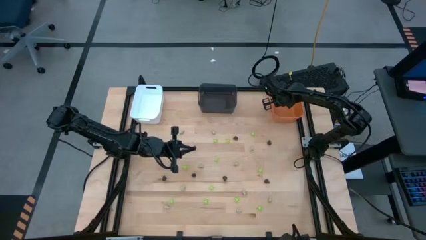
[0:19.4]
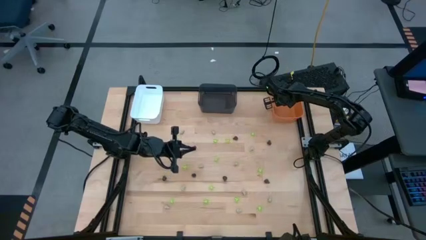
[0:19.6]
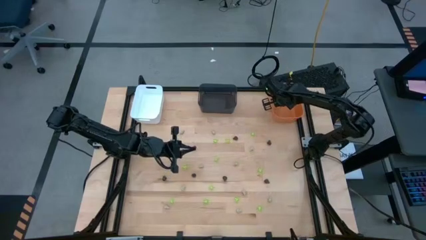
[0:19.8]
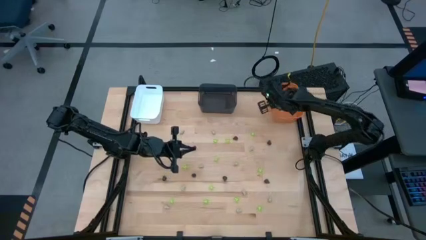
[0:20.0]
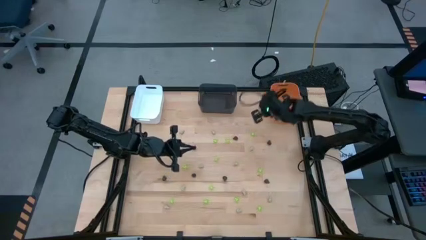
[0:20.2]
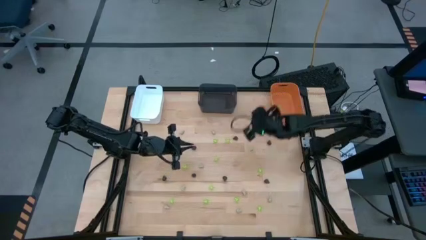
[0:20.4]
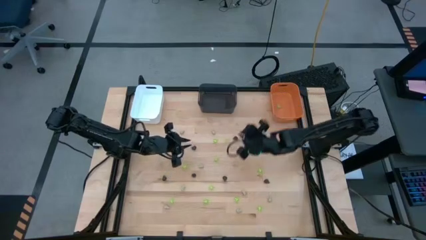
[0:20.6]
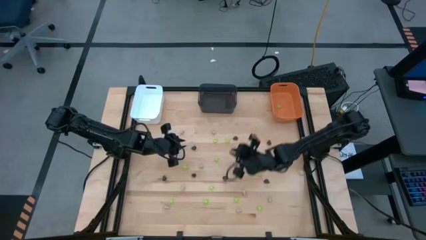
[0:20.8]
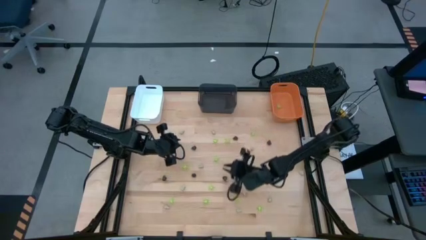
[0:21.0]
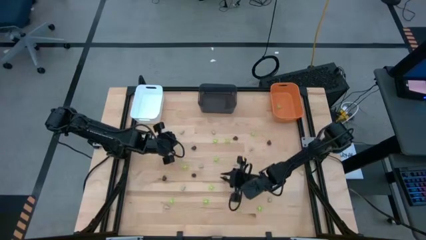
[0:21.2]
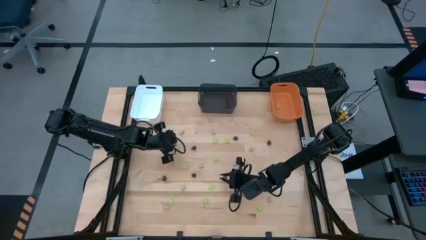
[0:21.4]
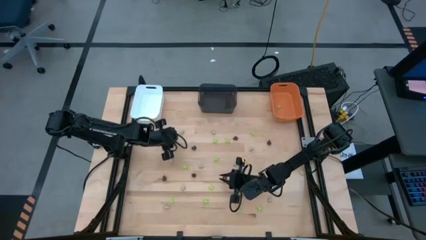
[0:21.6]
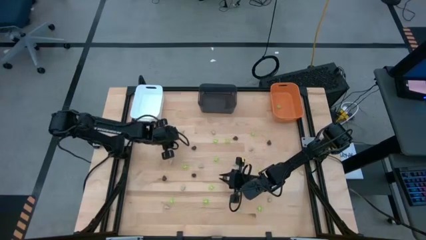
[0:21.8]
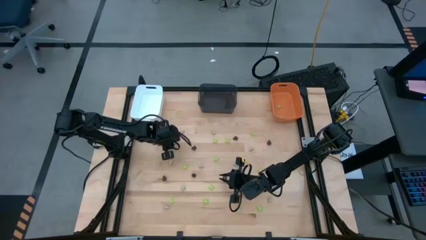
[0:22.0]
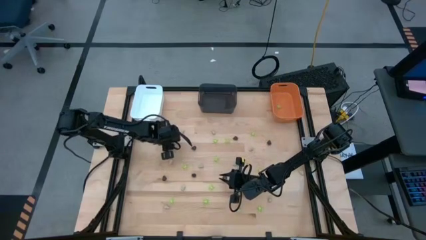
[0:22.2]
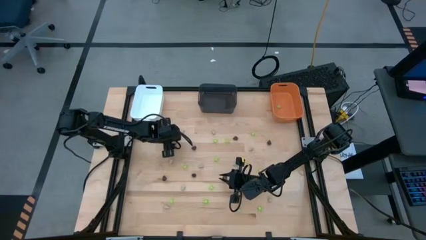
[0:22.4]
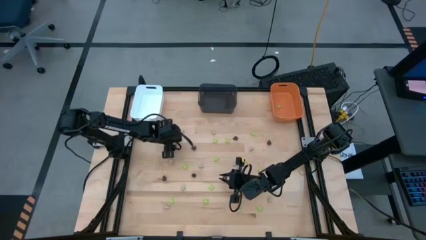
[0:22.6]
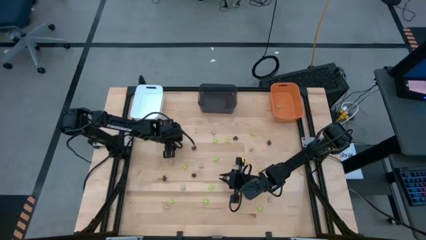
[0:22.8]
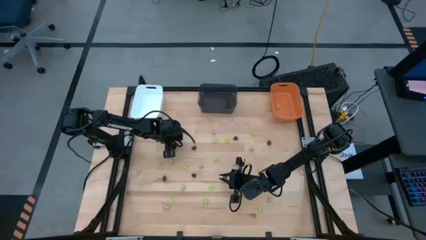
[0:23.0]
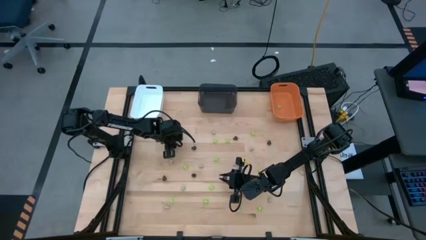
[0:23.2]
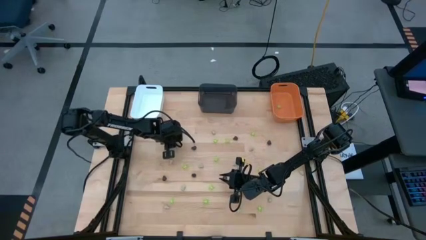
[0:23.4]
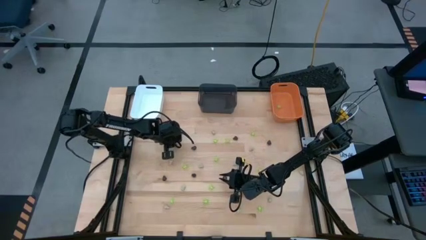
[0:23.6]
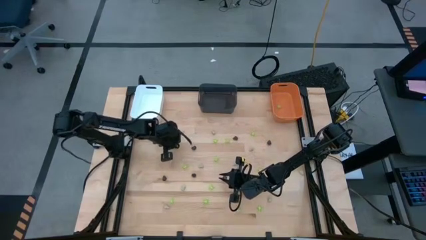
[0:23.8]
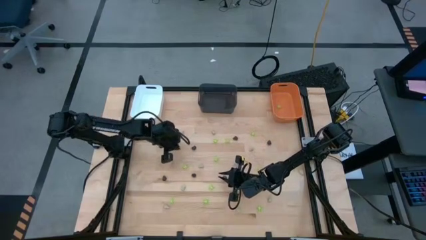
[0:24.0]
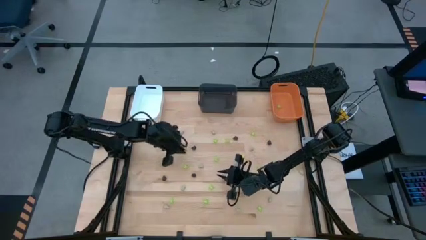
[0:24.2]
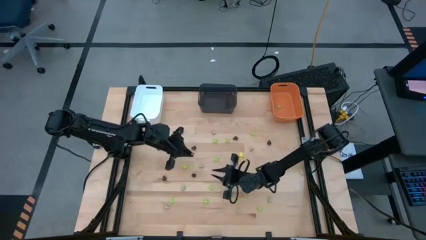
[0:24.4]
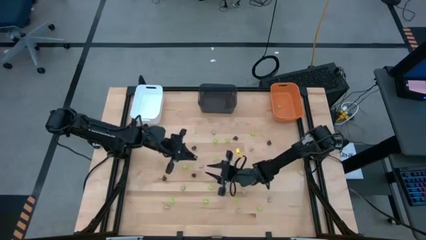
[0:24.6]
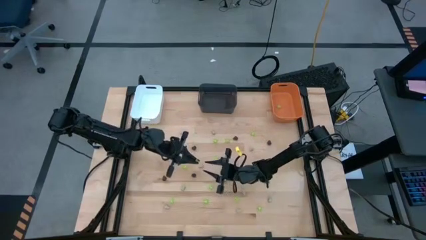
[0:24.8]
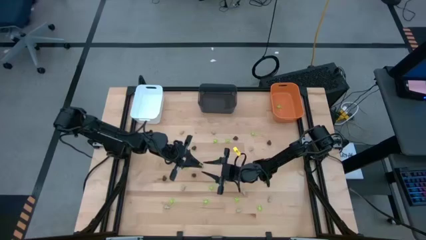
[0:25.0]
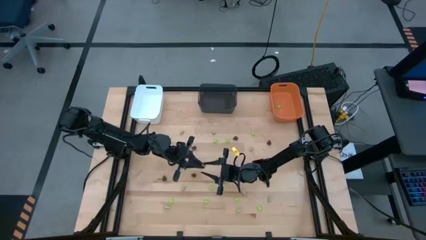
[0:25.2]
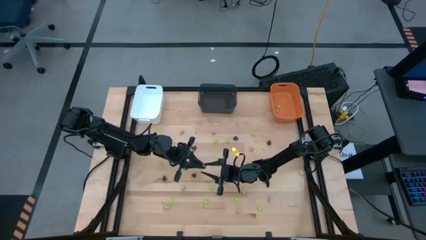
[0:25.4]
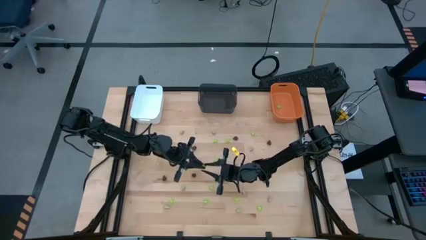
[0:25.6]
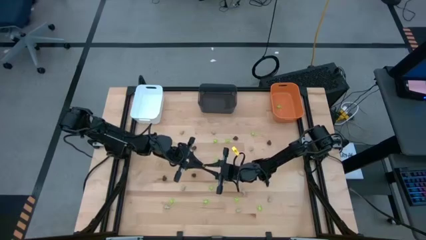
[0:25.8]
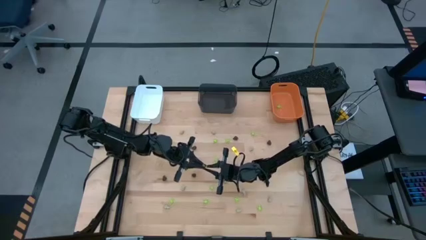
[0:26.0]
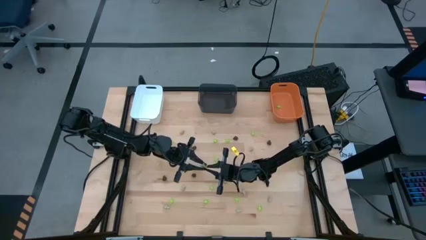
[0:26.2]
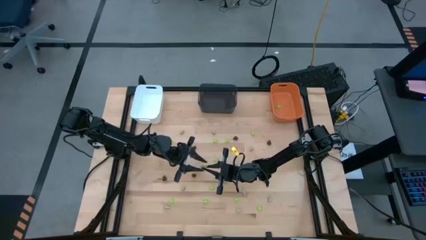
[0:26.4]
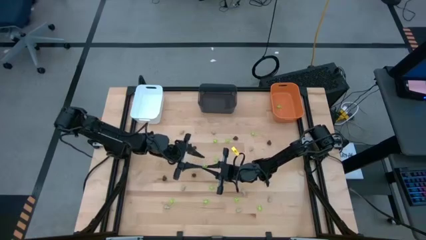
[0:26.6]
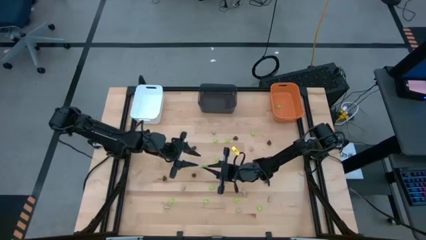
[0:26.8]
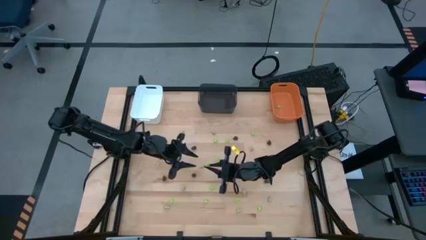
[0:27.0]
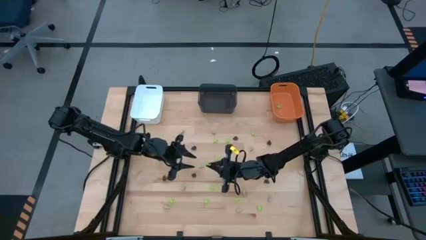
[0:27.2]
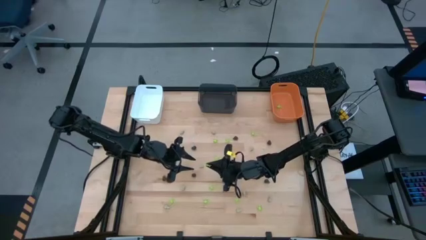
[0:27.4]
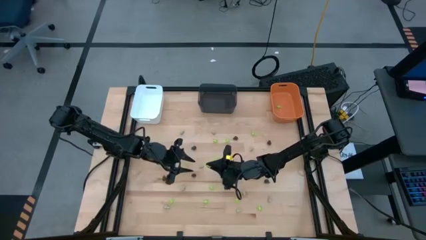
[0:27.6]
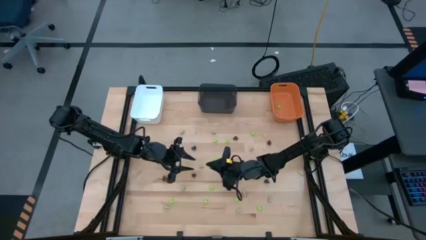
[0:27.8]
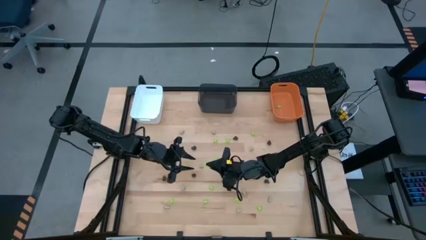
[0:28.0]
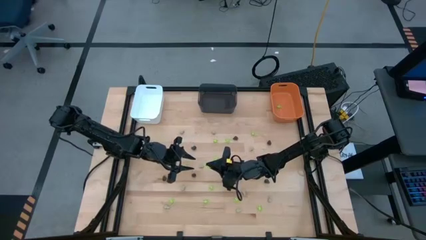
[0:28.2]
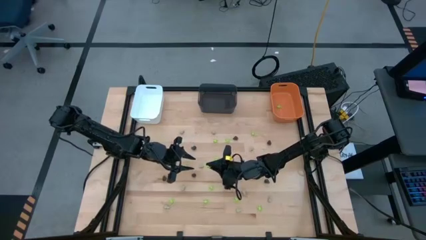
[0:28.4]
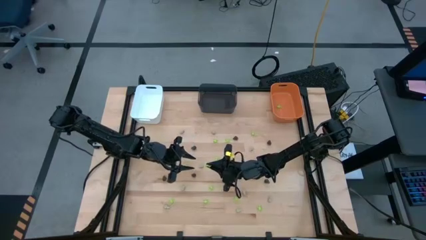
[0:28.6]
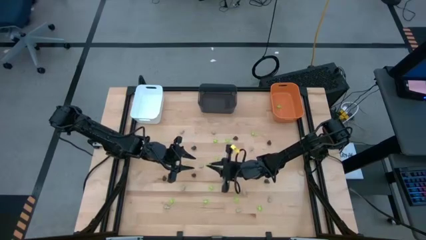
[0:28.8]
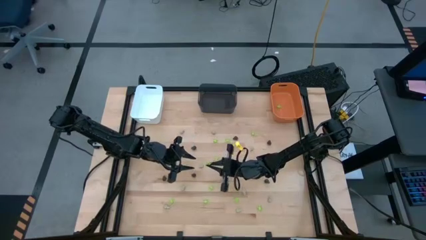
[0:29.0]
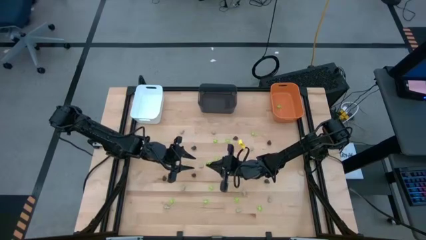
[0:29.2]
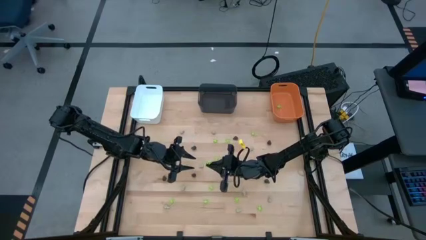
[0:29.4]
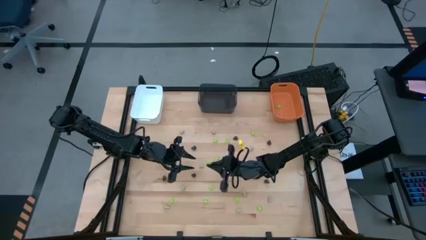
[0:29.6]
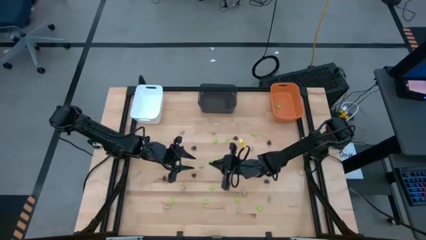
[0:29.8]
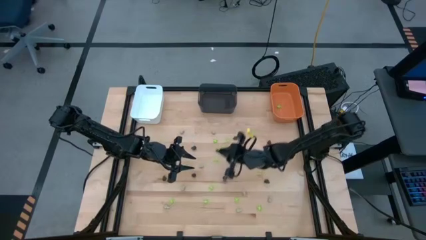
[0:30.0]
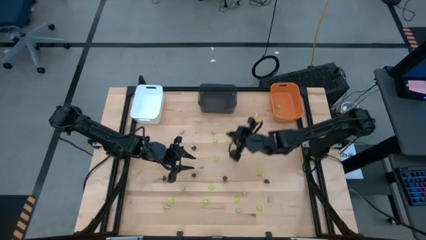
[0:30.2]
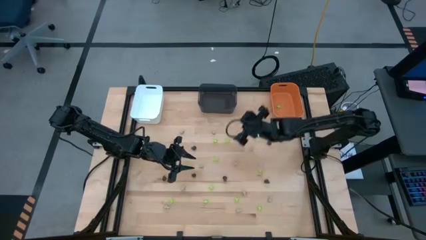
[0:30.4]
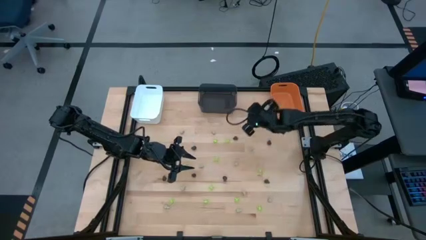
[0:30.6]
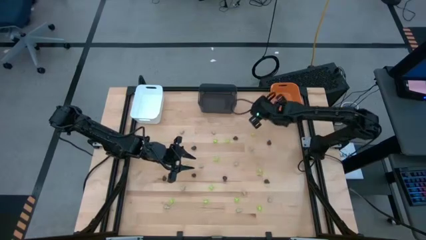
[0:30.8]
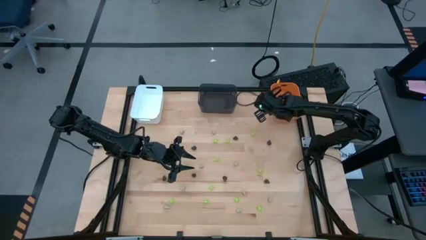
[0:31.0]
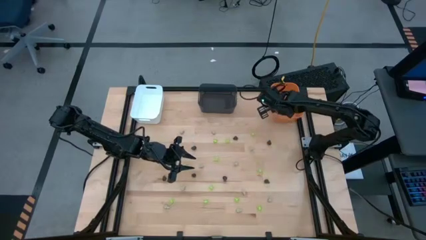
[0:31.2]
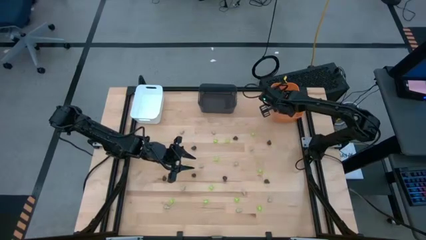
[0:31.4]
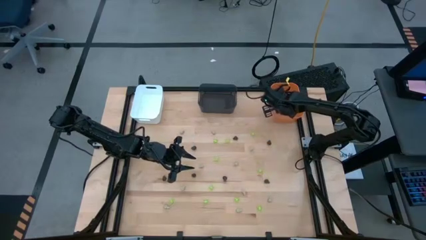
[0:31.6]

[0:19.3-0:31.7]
Task: Sort Halloween decoration
Put the green toy spider into the orange bin
